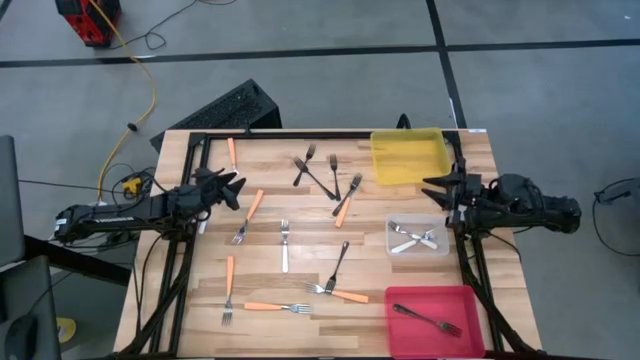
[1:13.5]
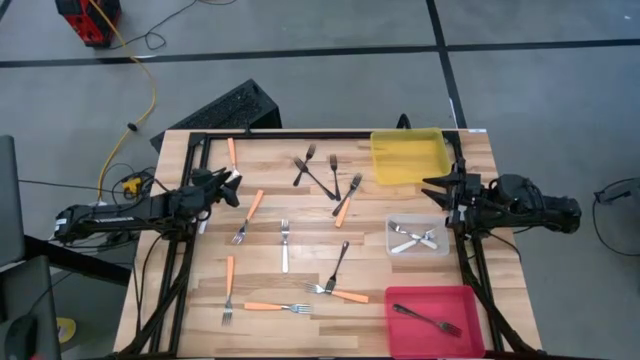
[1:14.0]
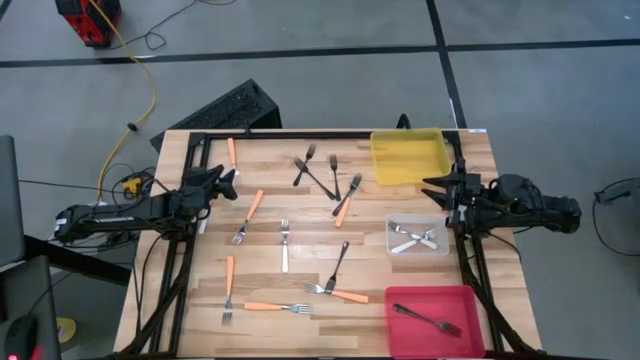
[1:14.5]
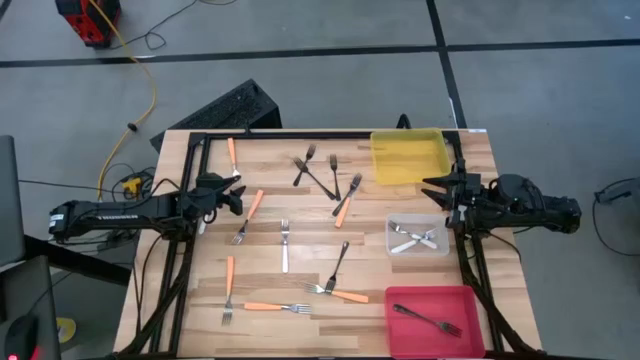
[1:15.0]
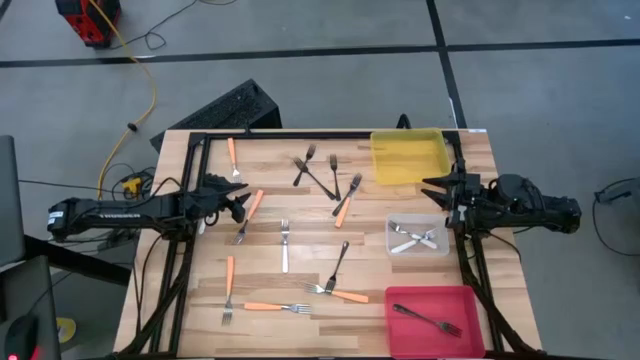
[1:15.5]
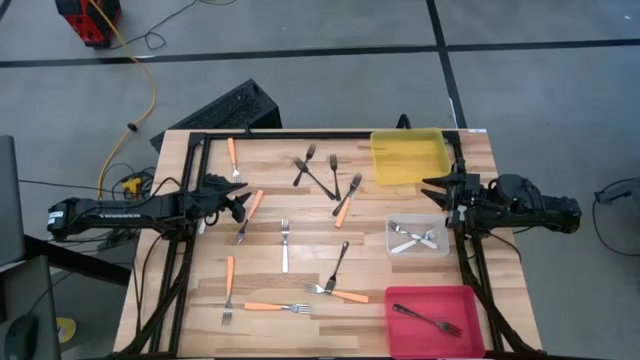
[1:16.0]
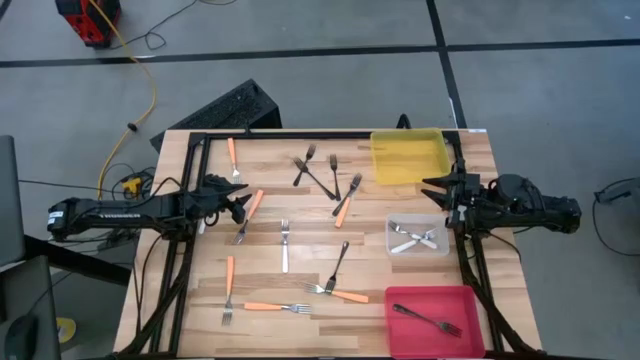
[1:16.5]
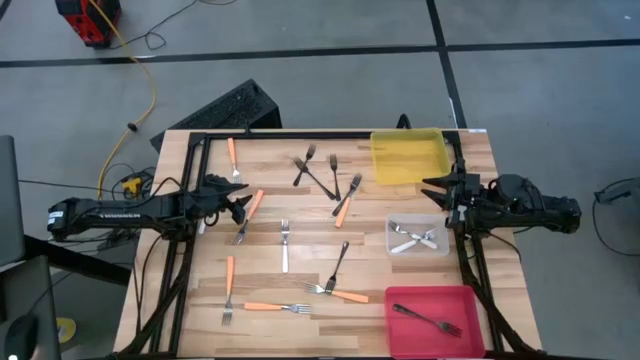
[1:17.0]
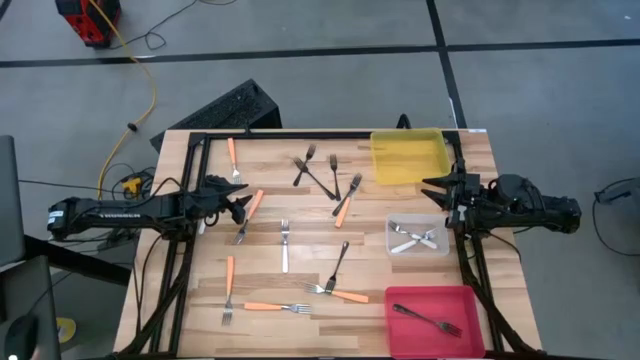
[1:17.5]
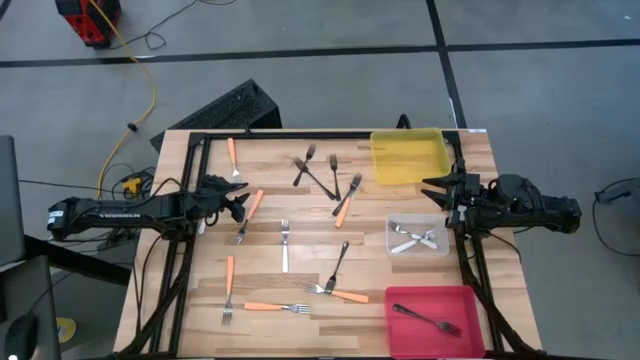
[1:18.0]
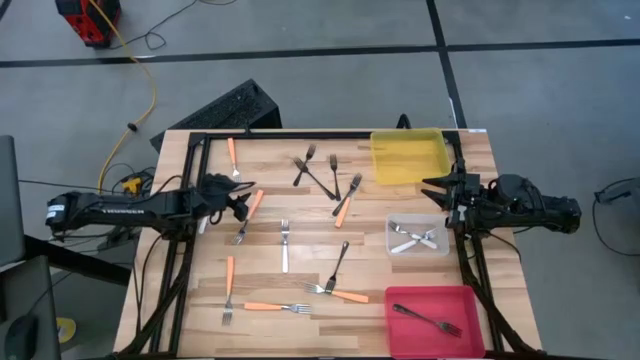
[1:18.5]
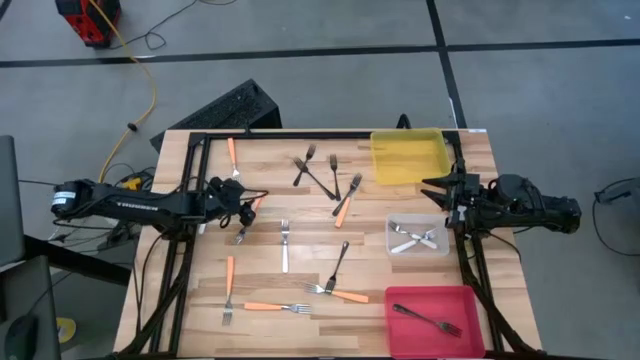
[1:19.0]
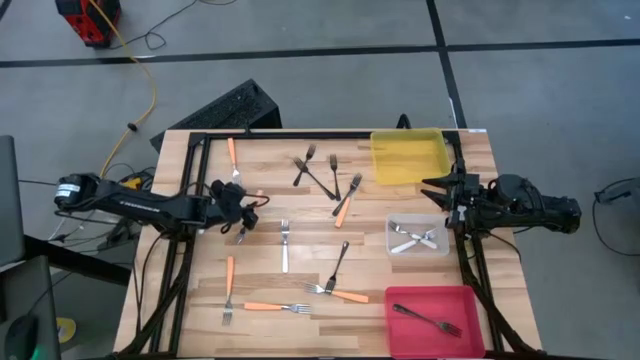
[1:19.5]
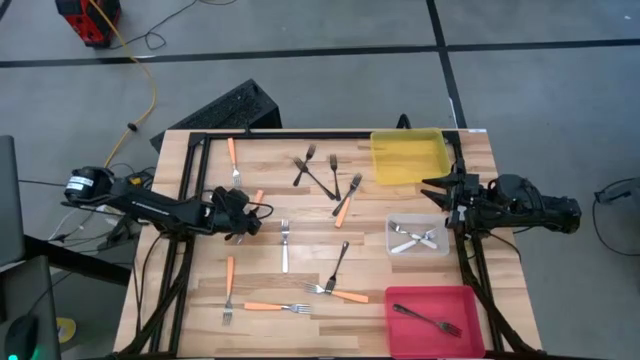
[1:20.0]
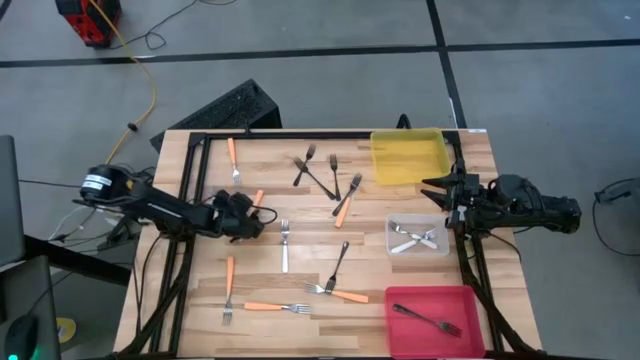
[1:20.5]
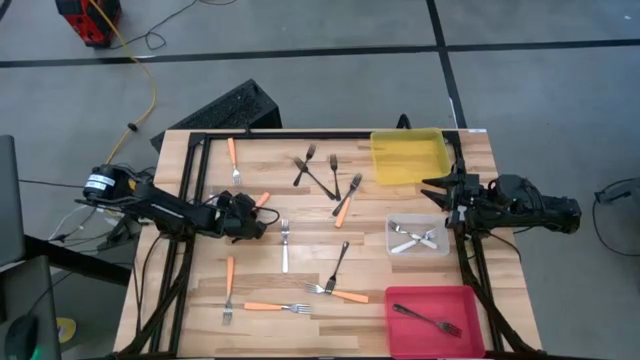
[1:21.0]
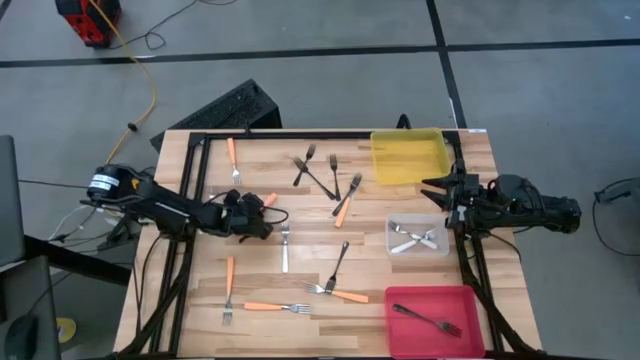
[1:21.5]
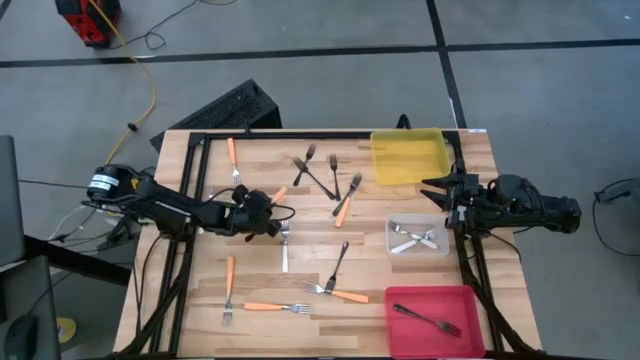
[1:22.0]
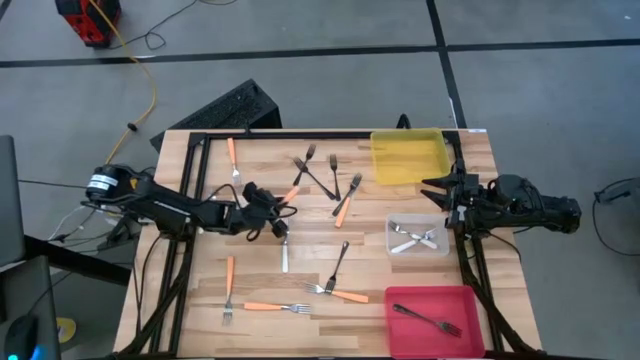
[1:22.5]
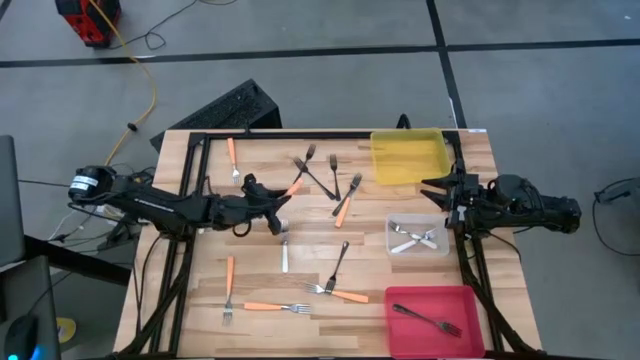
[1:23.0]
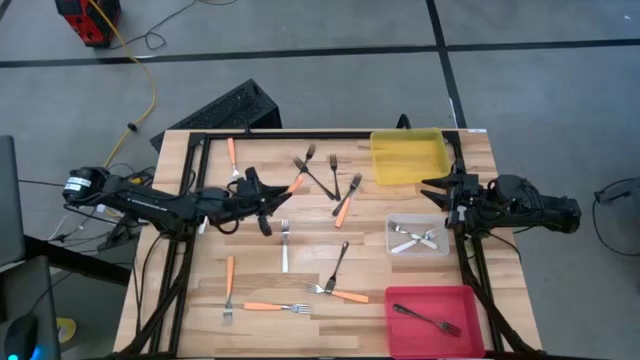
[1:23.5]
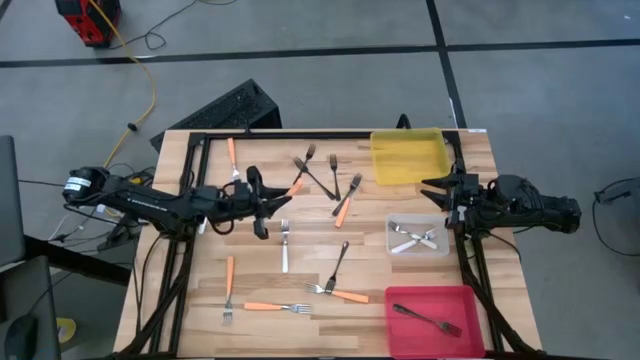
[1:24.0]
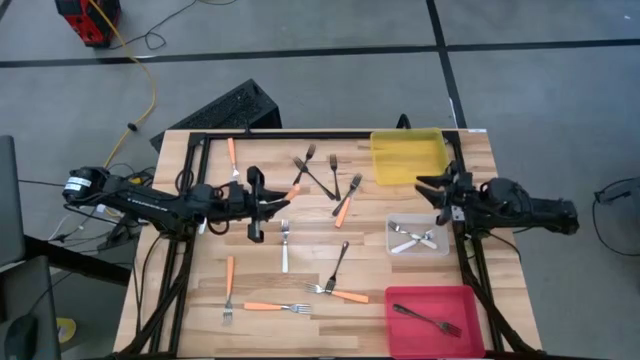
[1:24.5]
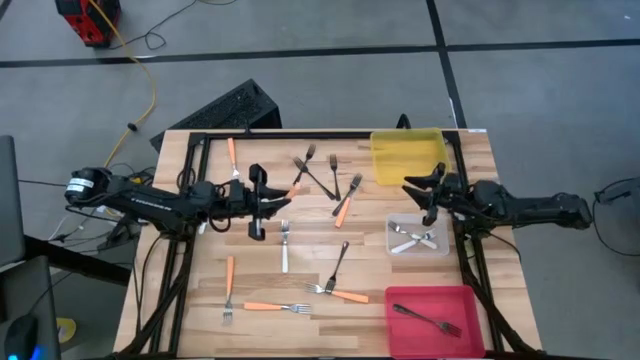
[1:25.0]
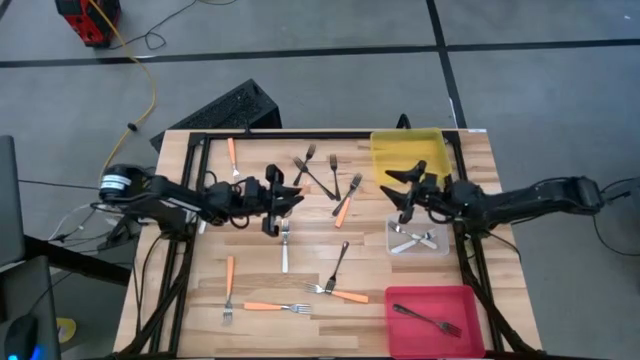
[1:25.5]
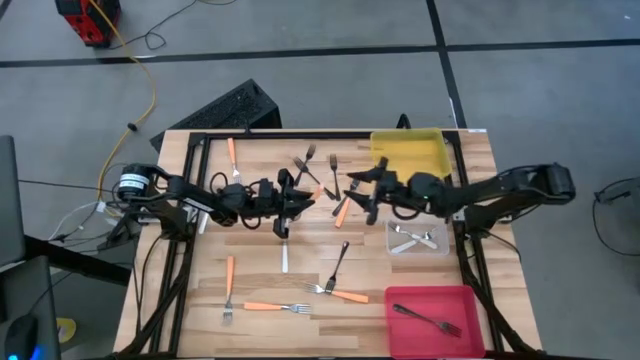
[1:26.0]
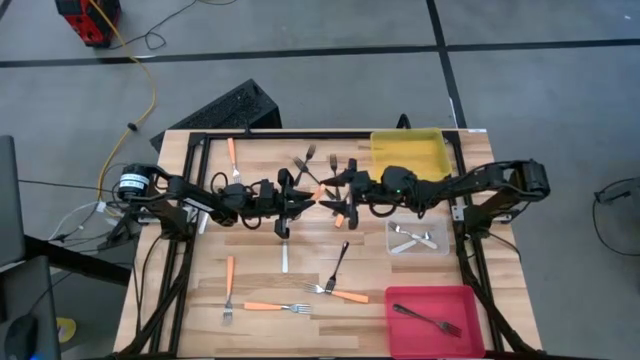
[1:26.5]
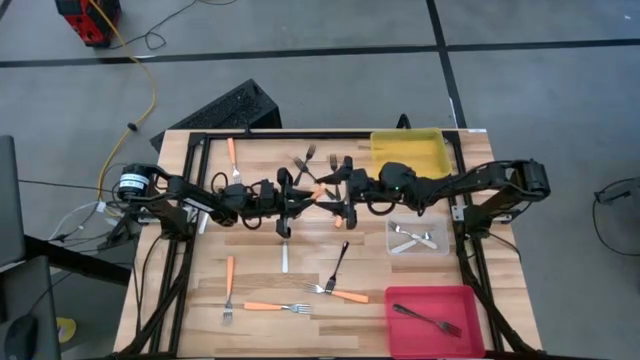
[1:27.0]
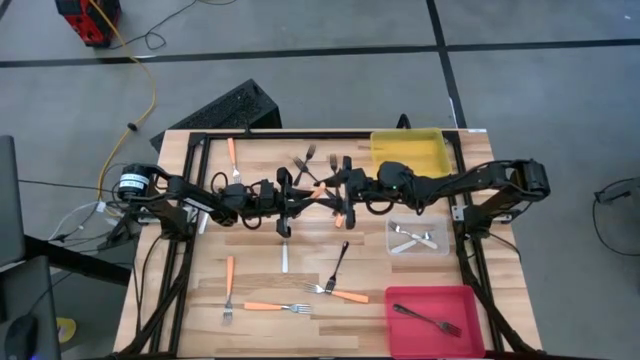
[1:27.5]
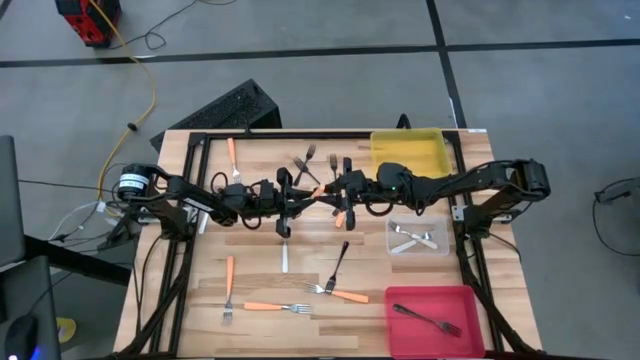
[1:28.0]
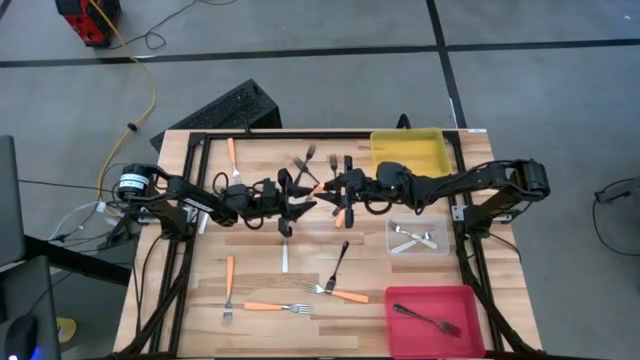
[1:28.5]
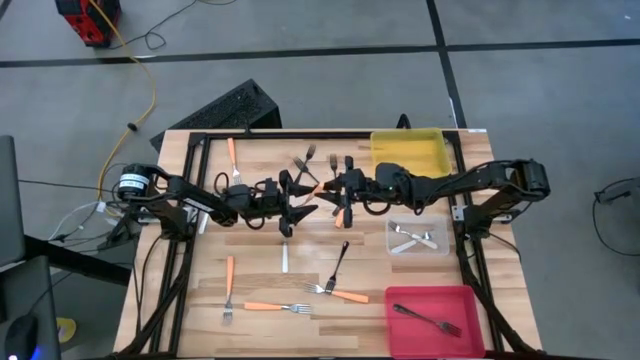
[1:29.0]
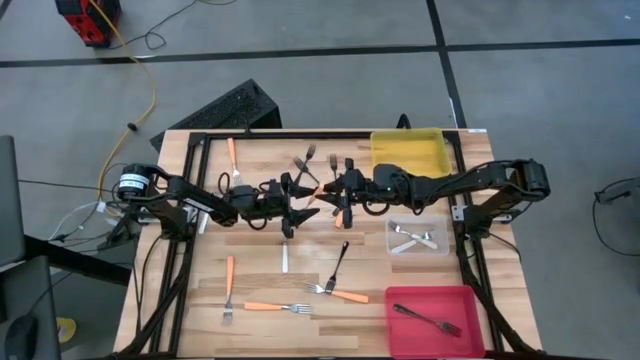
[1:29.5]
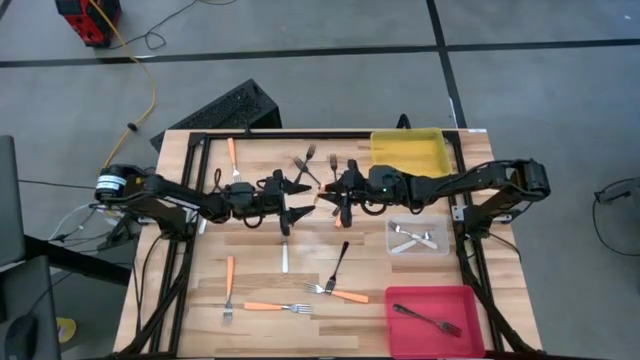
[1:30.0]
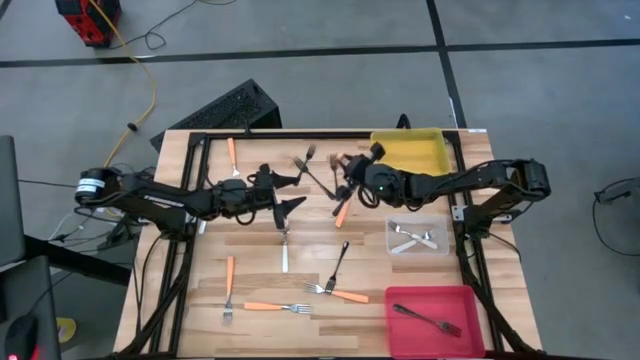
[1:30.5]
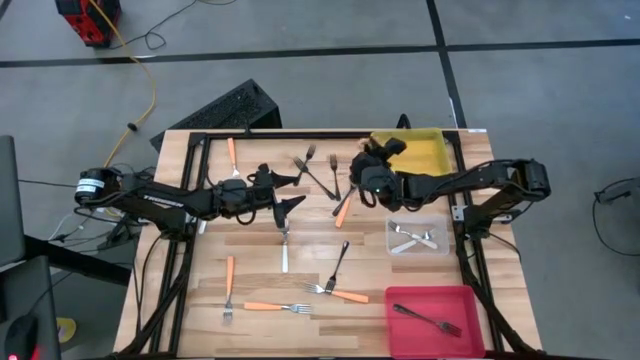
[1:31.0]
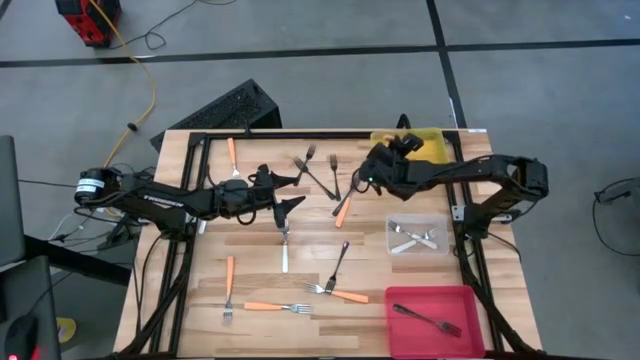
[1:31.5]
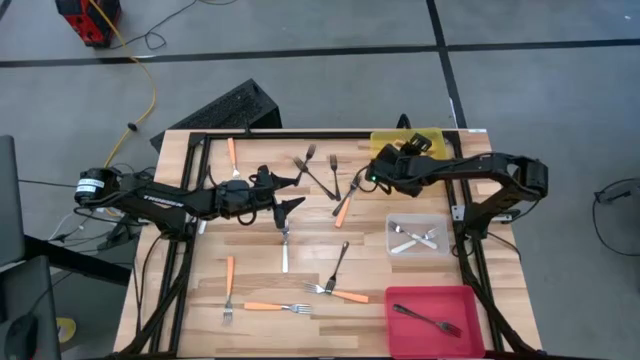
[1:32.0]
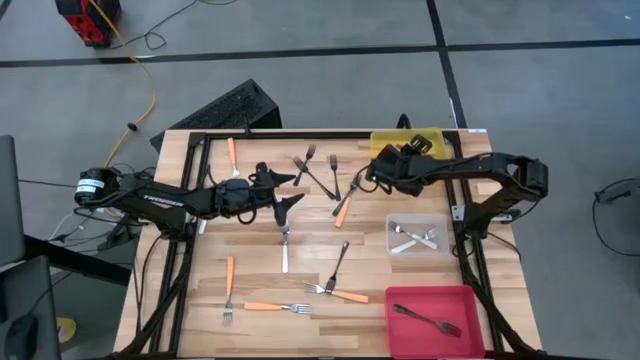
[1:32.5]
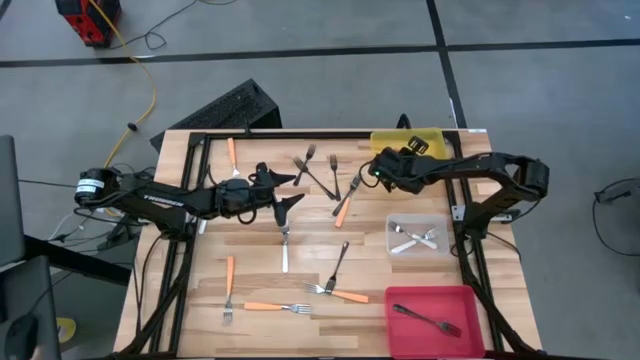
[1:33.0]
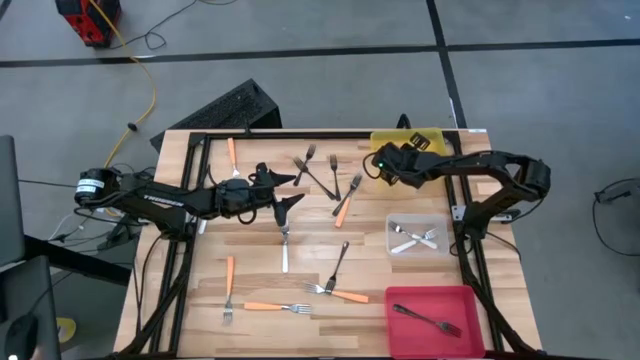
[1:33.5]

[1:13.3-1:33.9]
Task: Sort silverware by color (type)
Put the orange fork into the yellow bin
